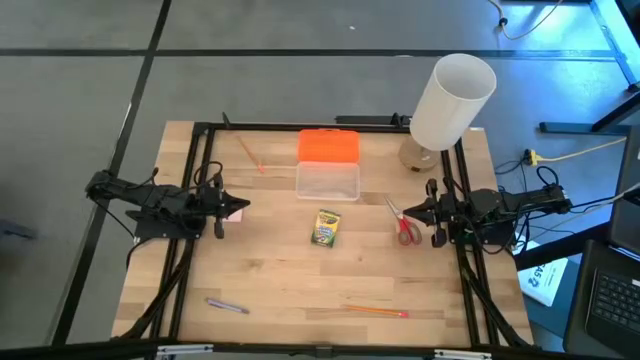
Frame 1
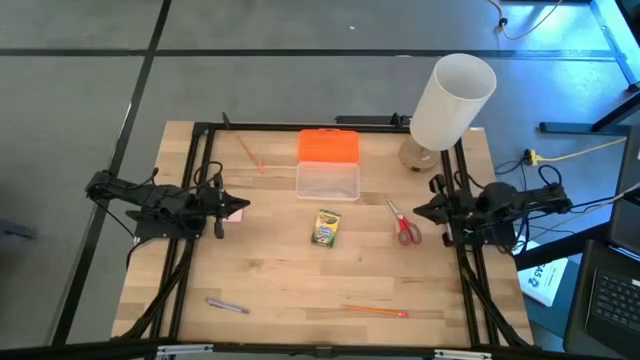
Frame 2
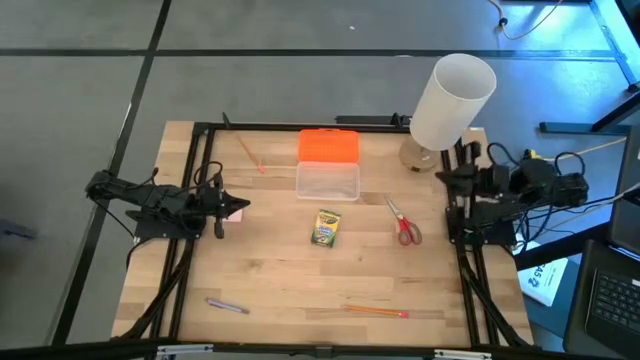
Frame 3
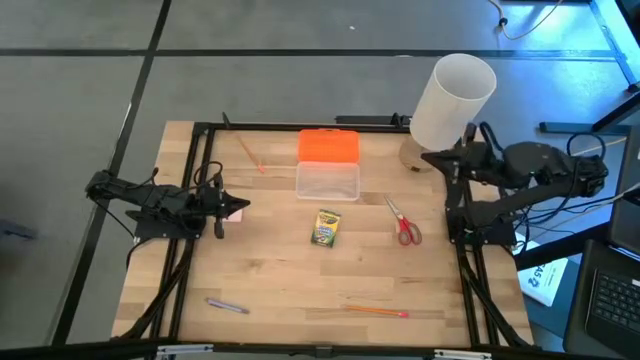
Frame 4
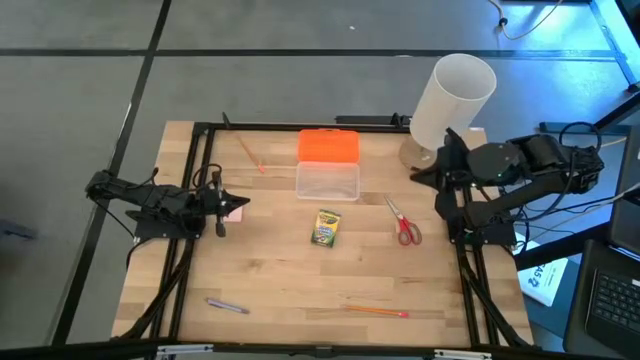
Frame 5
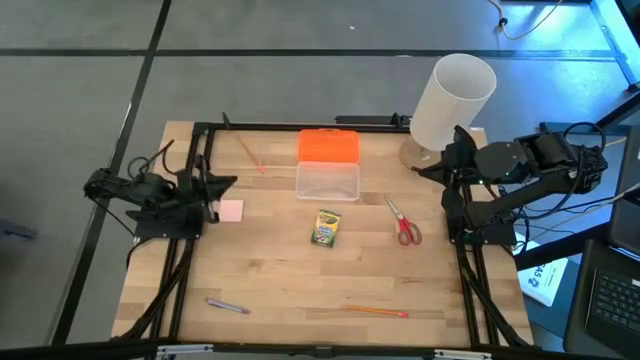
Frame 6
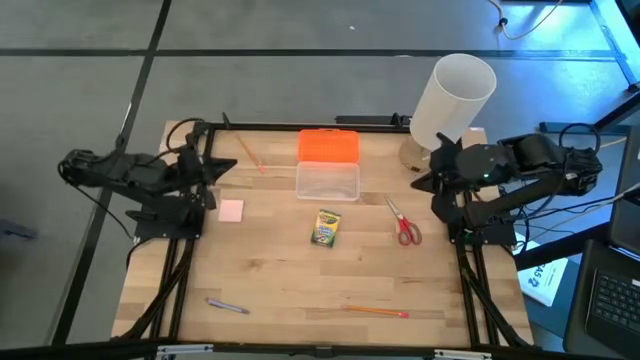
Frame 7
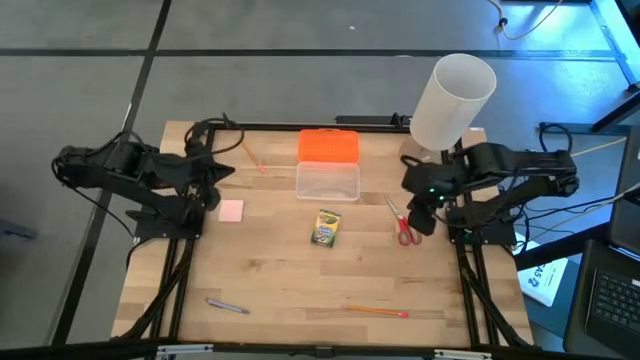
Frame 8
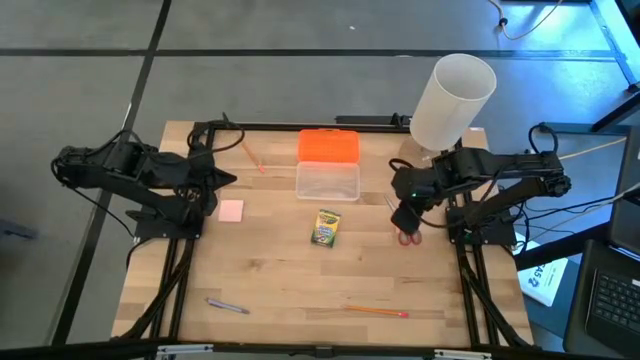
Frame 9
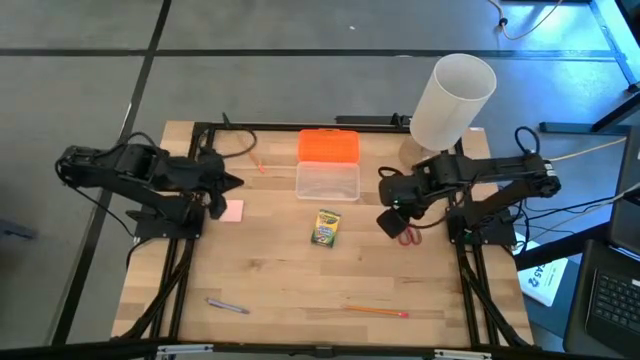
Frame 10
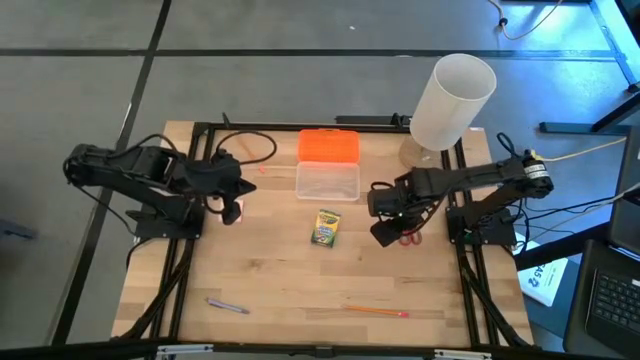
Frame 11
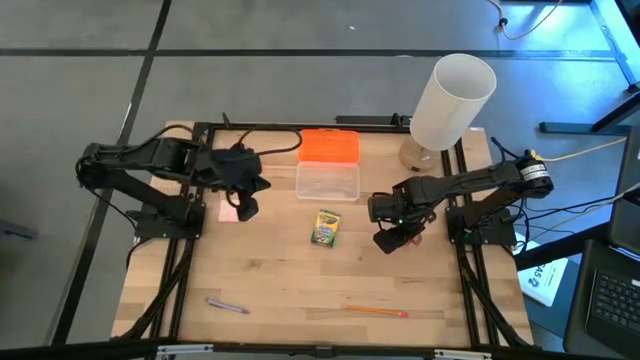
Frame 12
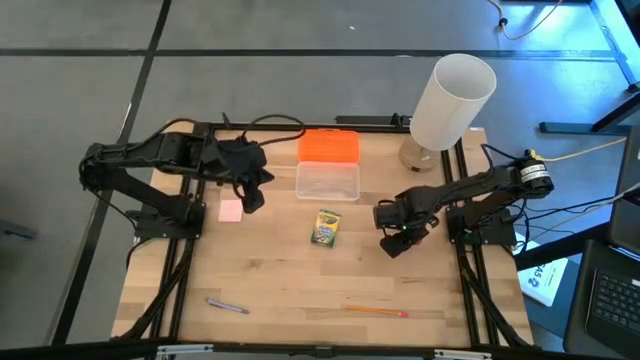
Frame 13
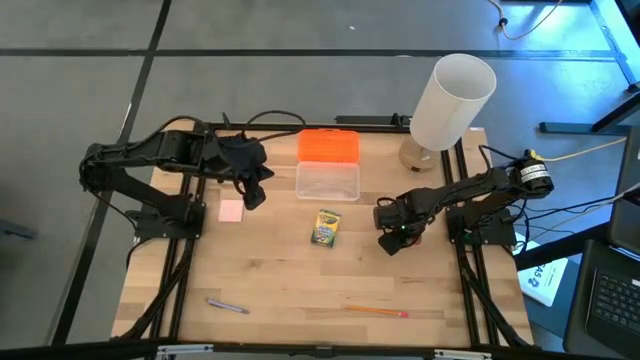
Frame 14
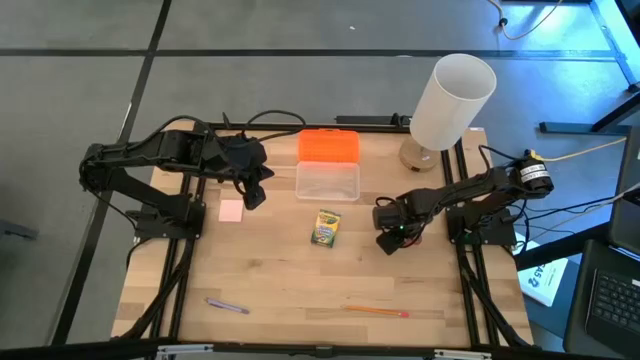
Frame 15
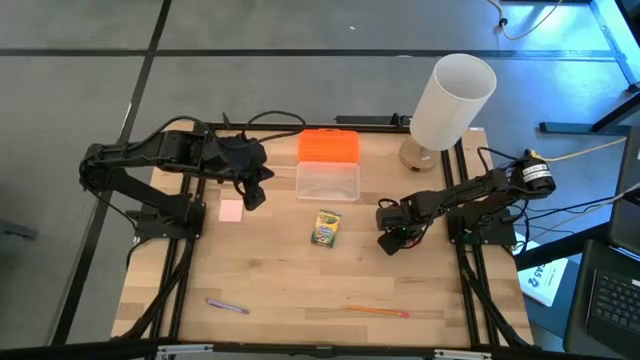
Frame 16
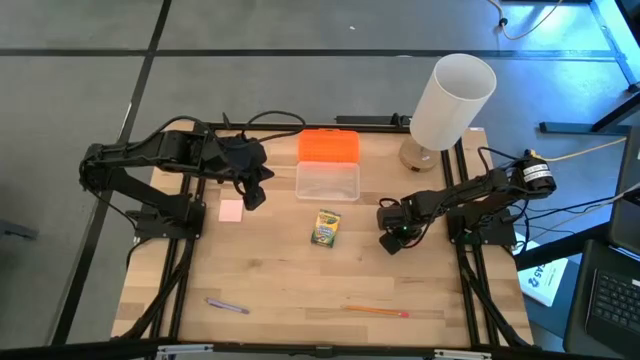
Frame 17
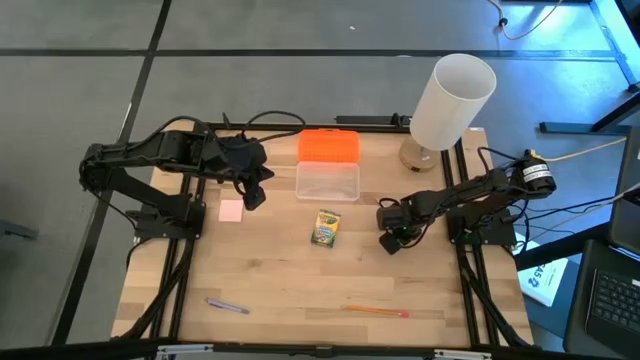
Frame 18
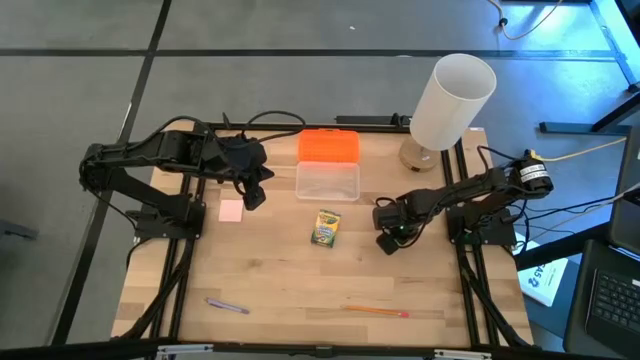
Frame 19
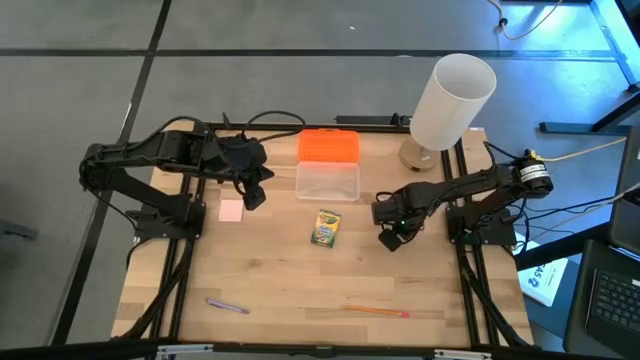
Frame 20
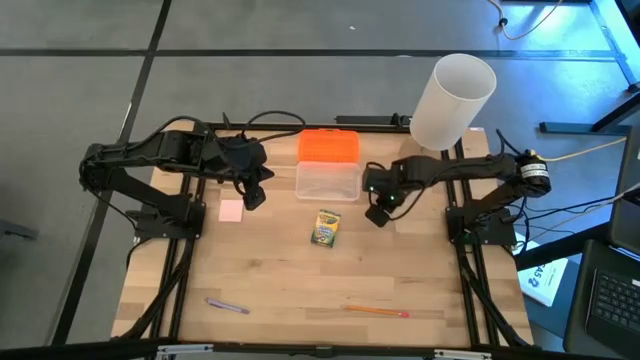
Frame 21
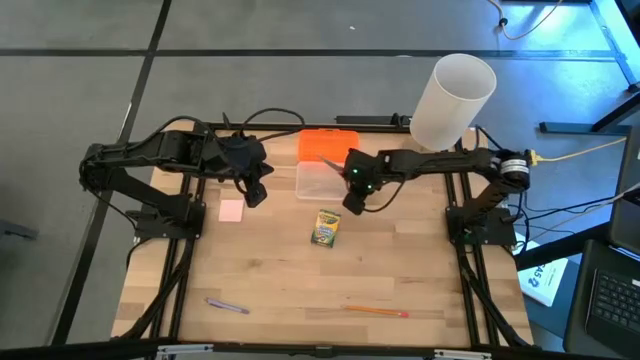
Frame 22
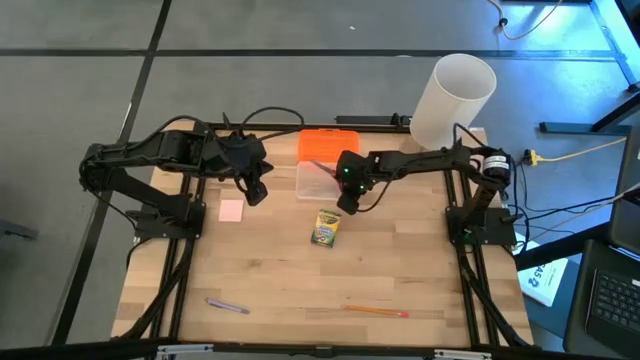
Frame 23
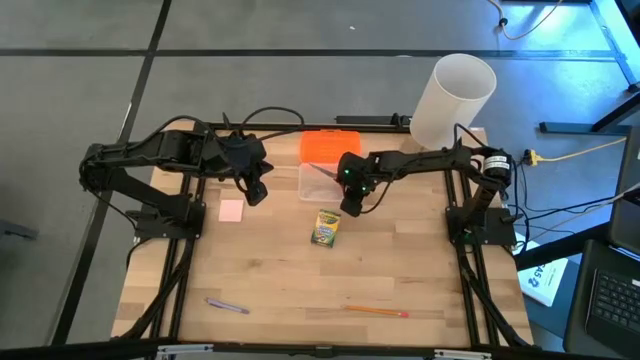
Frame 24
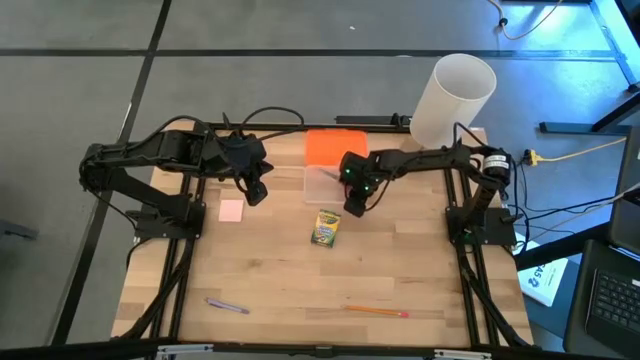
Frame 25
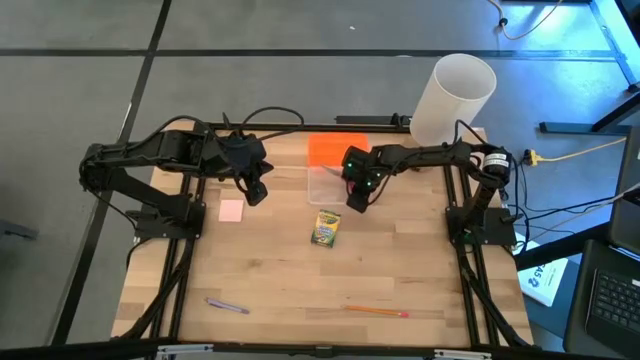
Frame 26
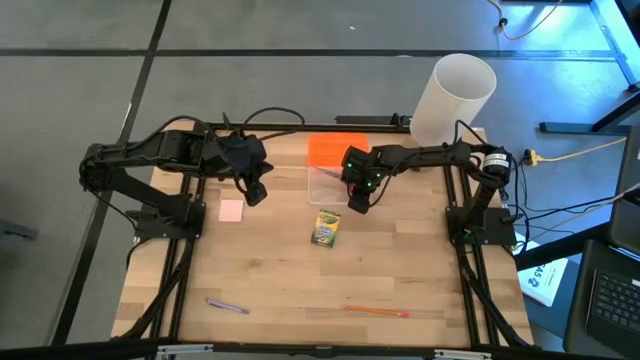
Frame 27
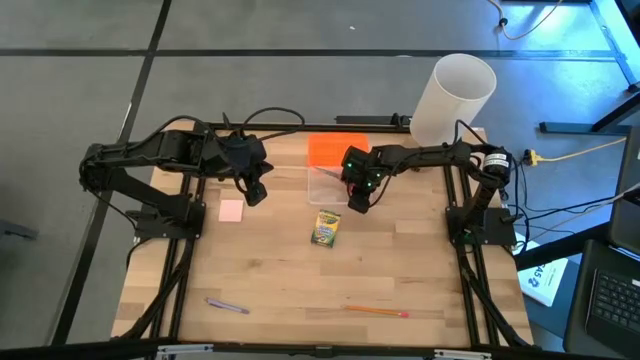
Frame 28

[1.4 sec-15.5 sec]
Task: Pack school essentials
Put the red scissors into the orange supply box
